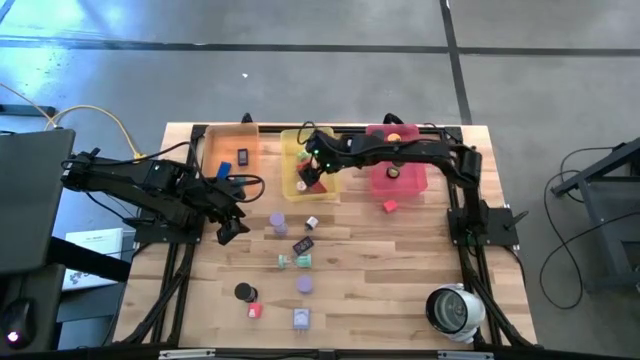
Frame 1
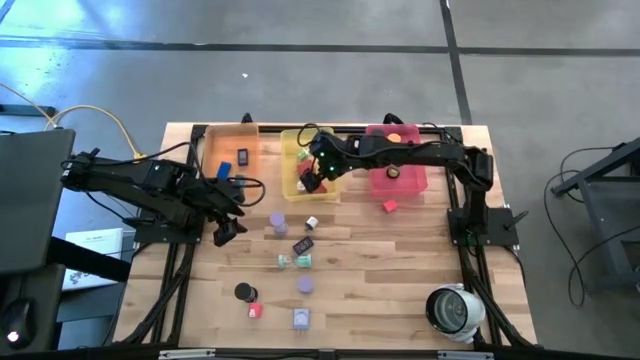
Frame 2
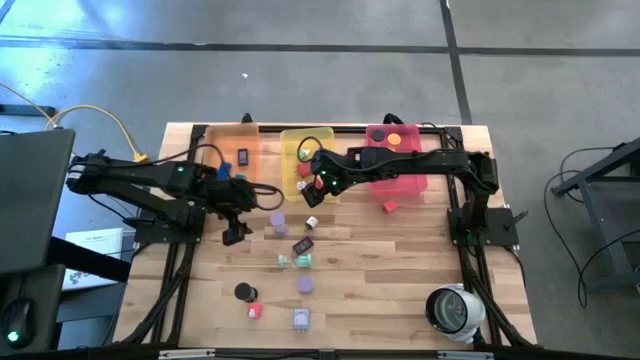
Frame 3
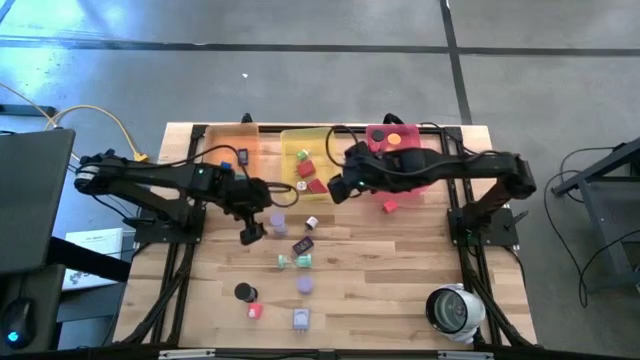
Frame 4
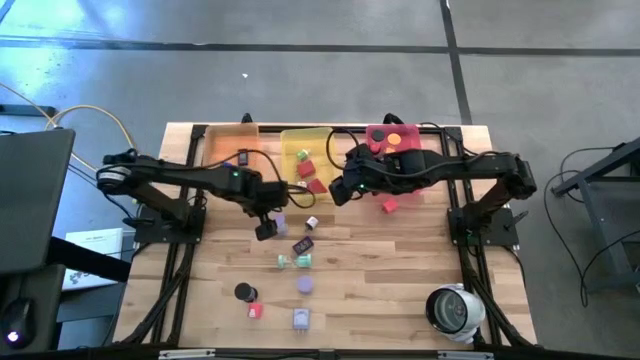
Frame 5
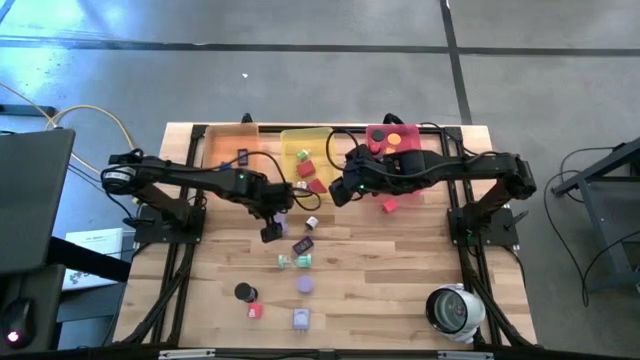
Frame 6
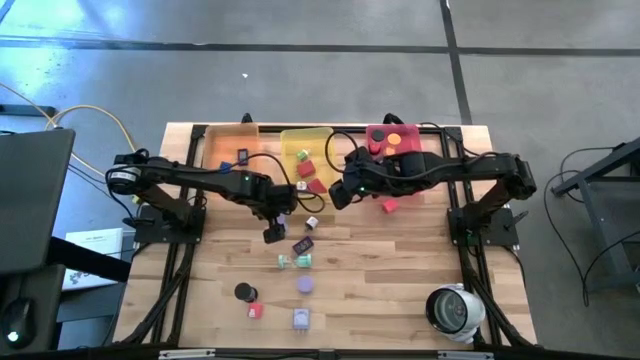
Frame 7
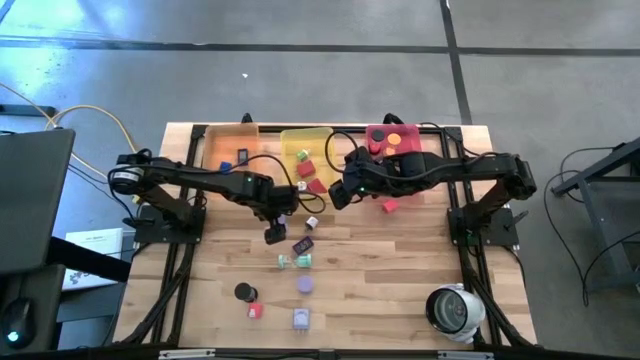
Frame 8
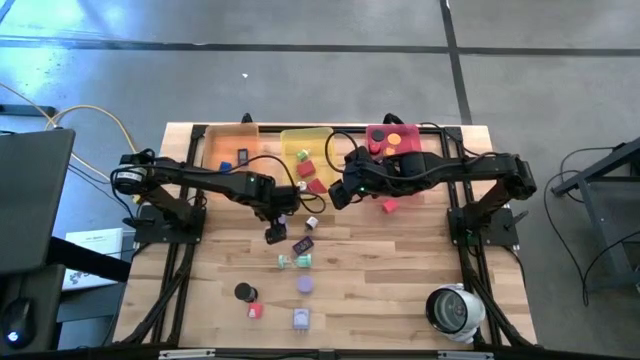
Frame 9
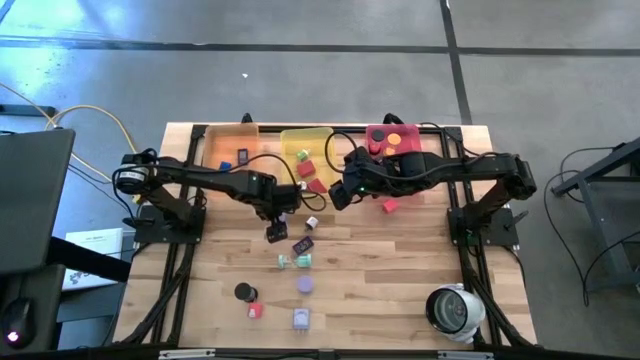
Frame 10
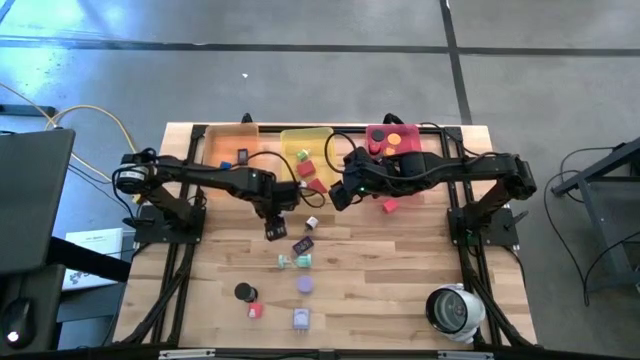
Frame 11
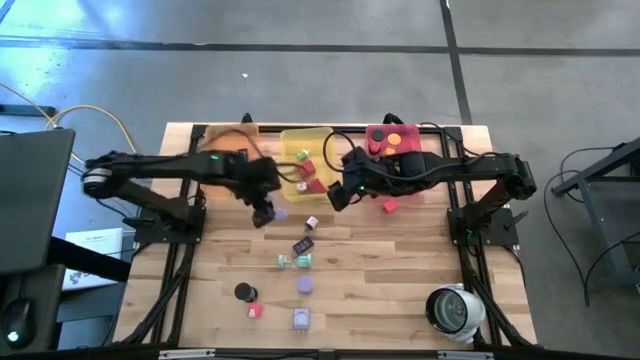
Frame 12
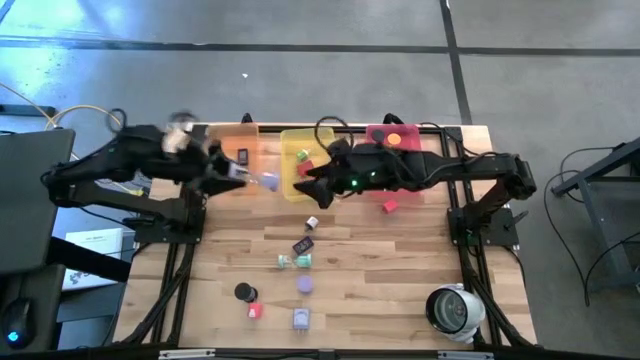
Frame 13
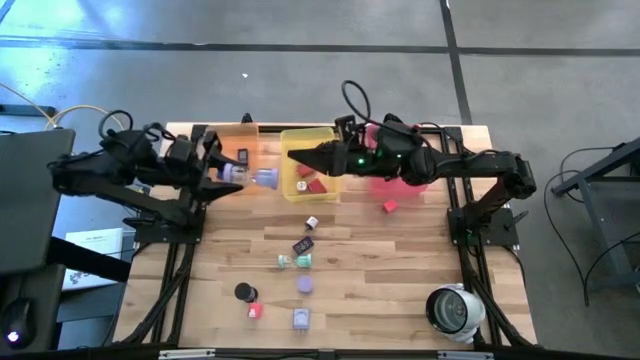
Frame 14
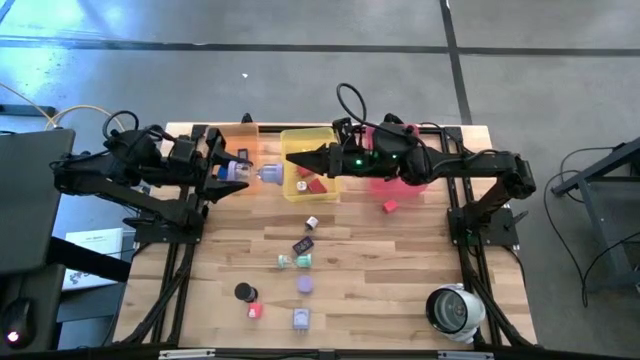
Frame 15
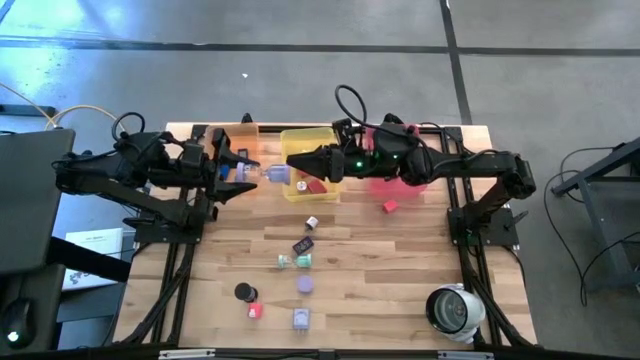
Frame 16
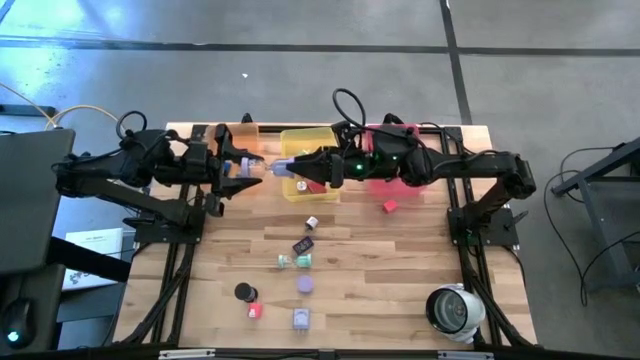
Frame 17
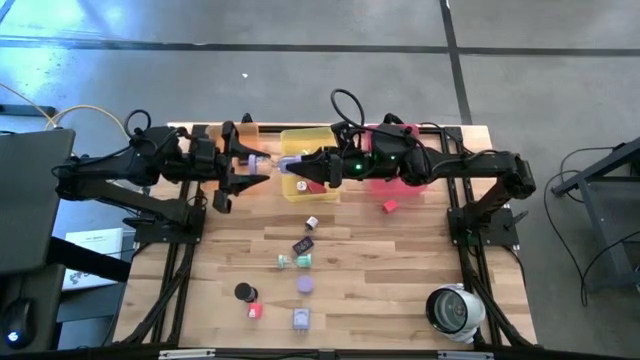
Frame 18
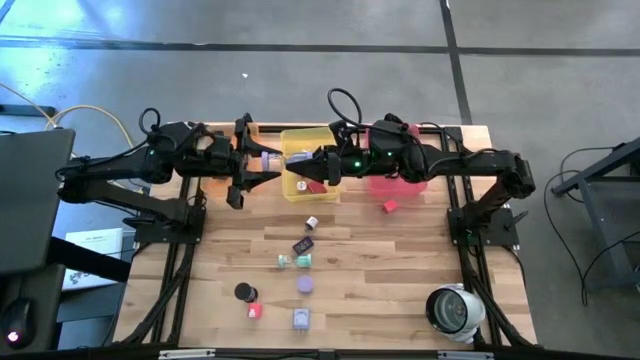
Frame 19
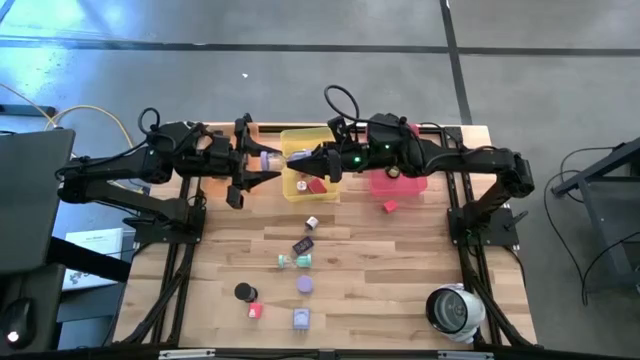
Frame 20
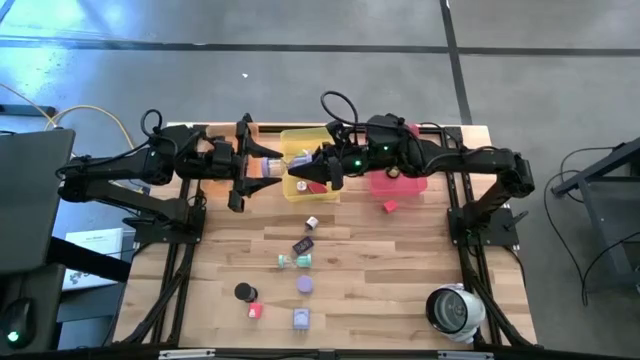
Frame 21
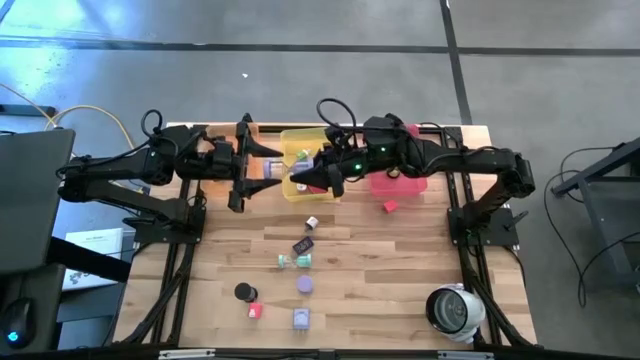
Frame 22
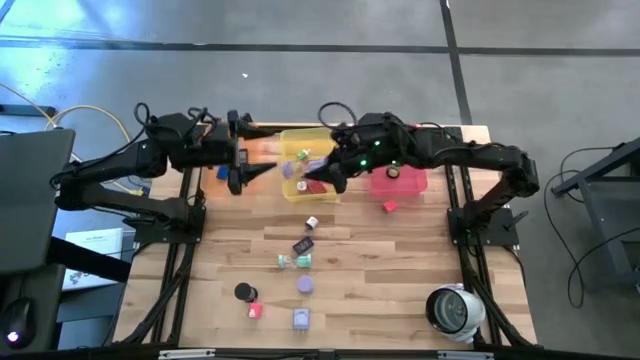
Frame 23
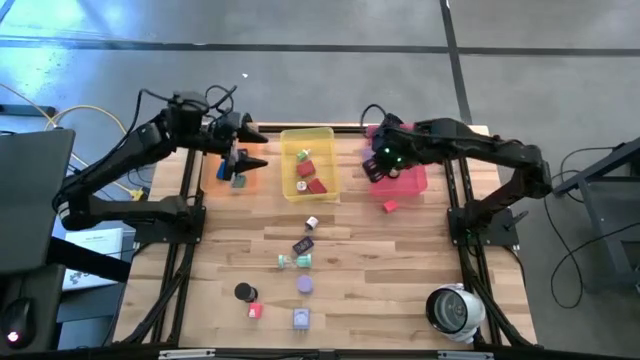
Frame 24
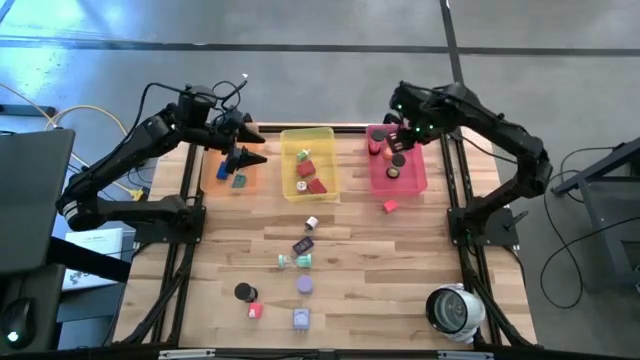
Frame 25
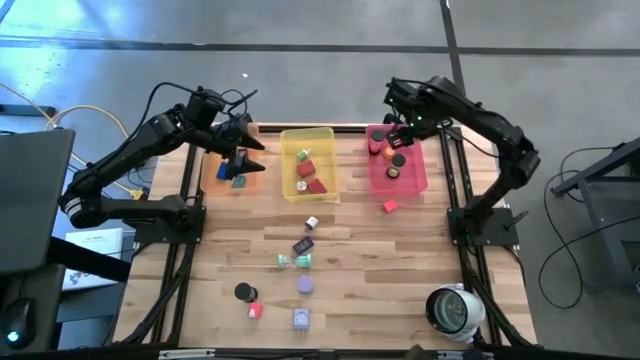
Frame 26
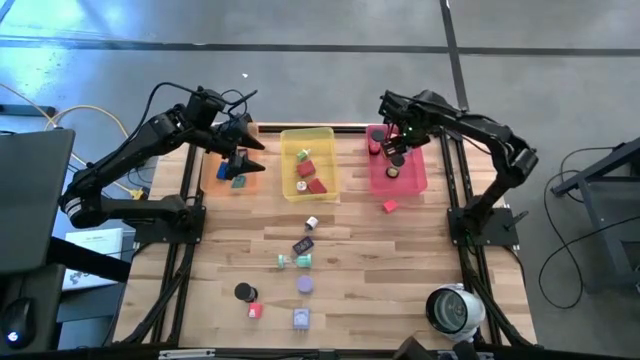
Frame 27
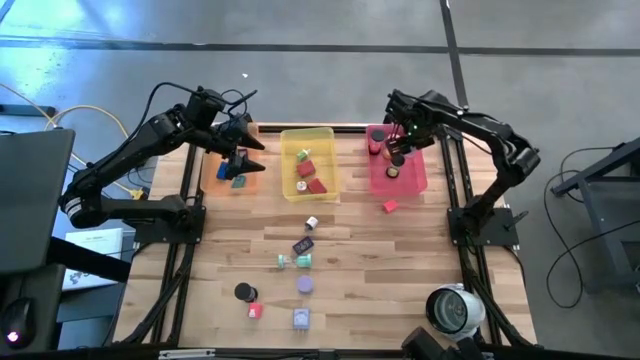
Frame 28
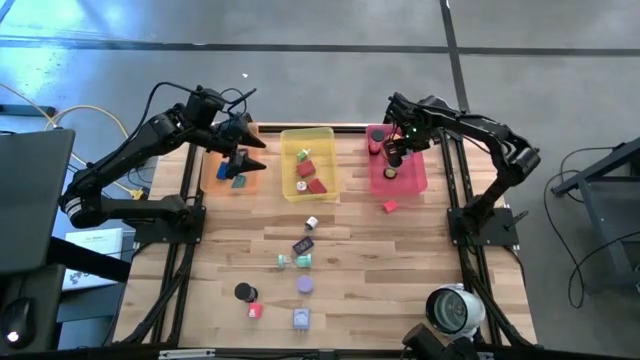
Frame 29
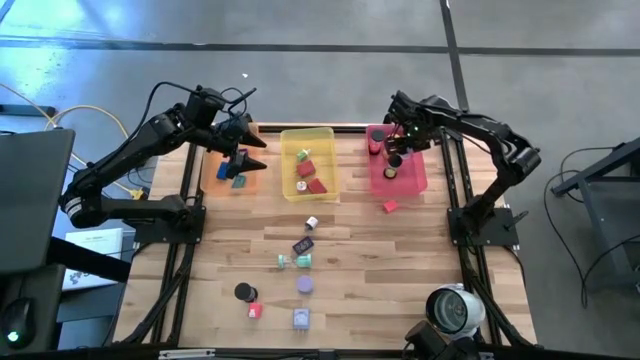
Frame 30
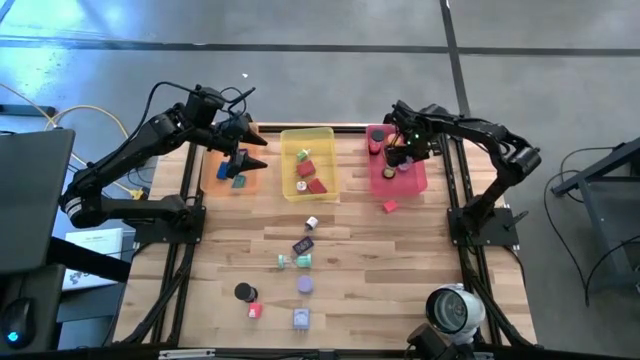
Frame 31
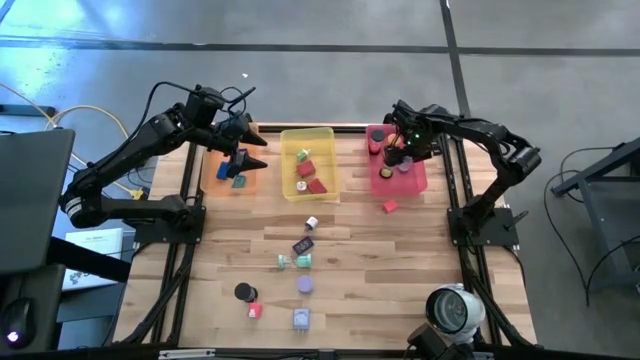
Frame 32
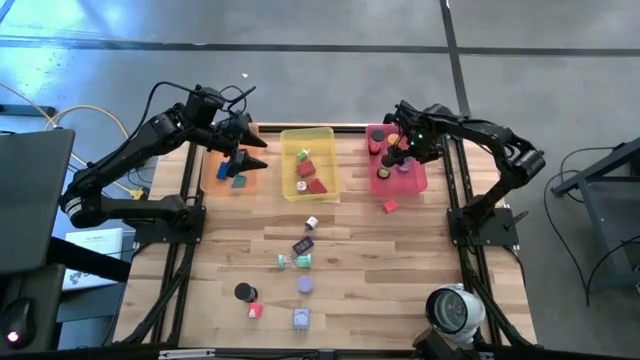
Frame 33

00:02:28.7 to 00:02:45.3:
Task: Pick & Place Office items
Put the top purple sand timer into the pink bin
